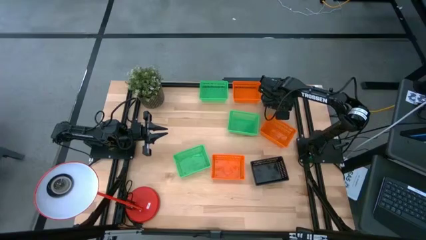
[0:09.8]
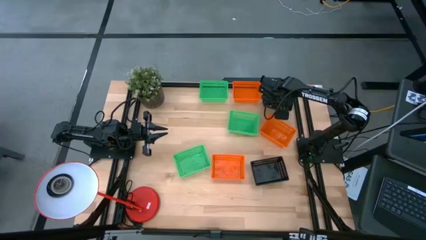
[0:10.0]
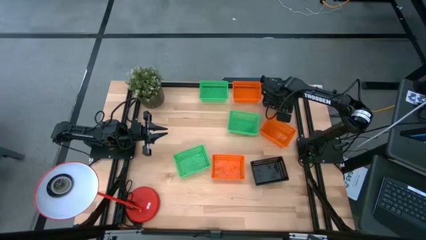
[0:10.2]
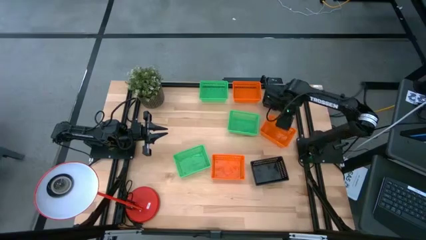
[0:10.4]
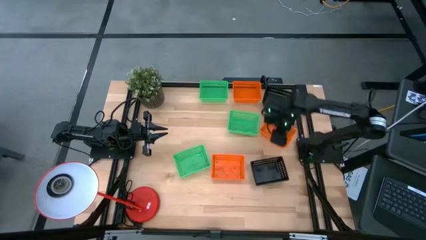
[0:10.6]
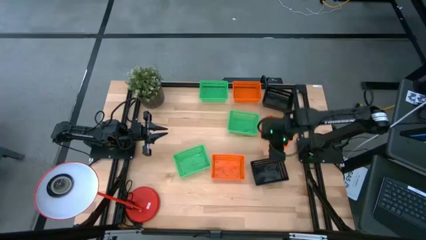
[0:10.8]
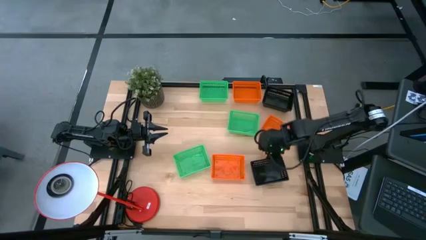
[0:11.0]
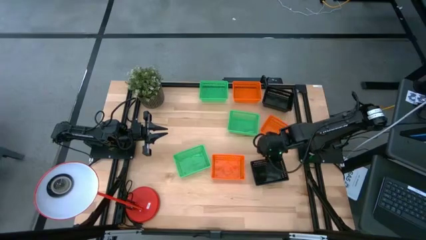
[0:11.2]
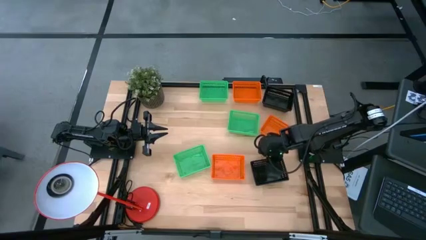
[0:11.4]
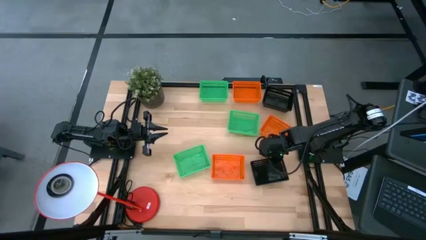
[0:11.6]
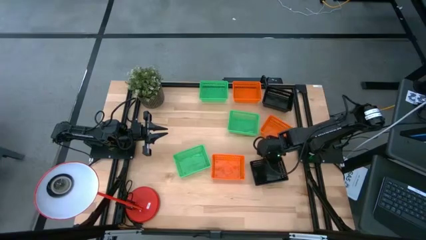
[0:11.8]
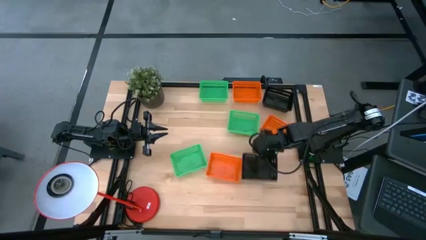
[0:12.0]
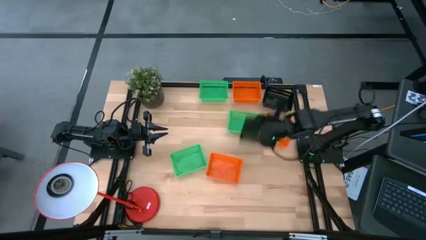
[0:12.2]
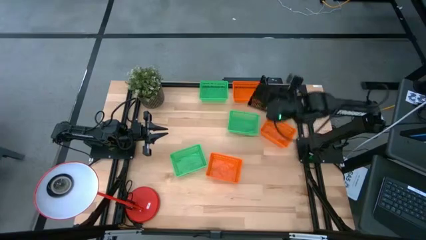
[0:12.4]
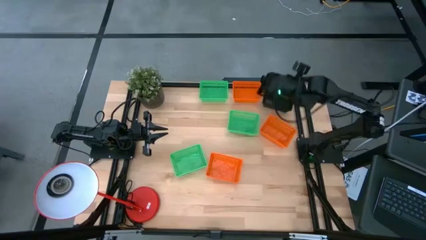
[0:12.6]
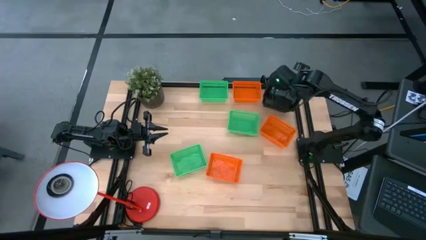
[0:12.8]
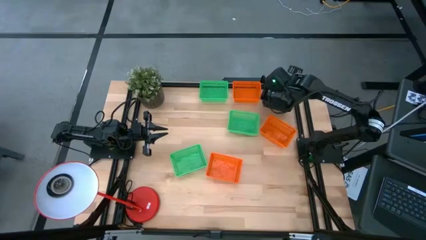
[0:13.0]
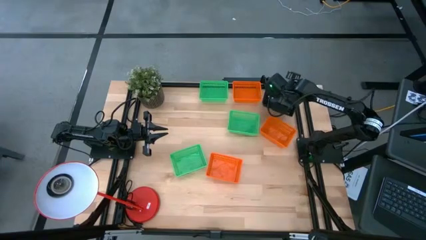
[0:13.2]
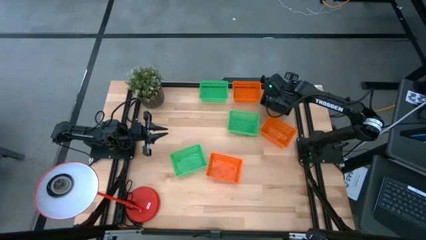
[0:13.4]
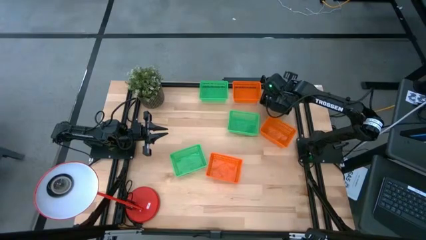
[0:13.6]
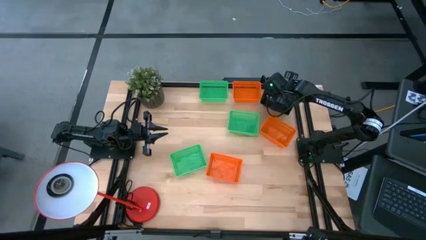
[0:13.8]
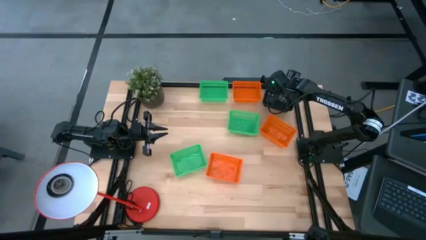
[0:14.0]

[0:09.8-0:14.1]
Stack the bottom black bin on top of the top black bins

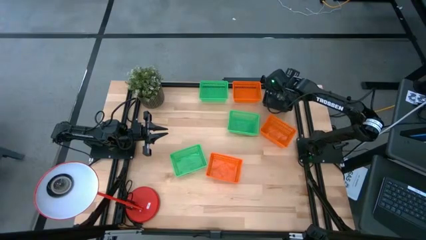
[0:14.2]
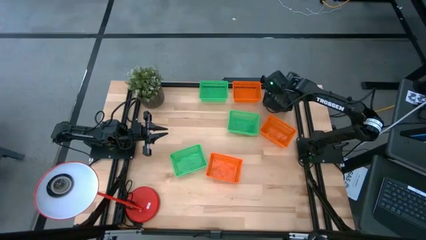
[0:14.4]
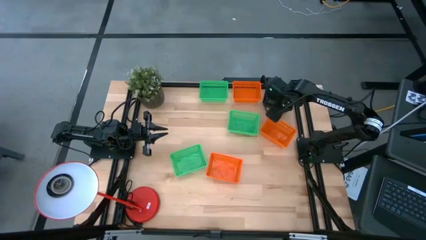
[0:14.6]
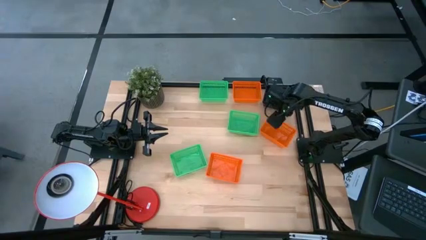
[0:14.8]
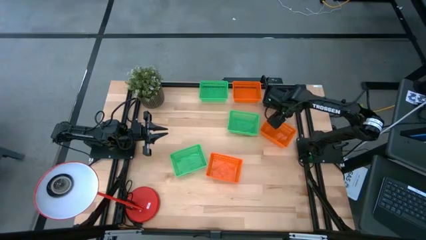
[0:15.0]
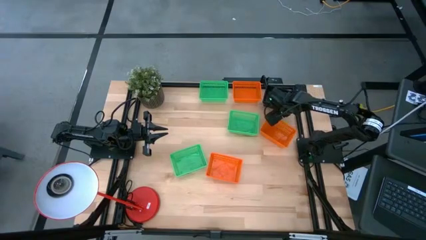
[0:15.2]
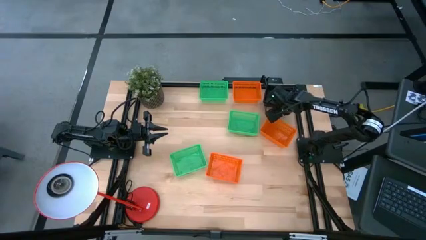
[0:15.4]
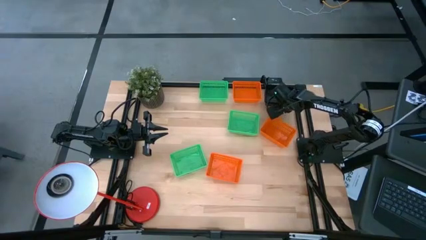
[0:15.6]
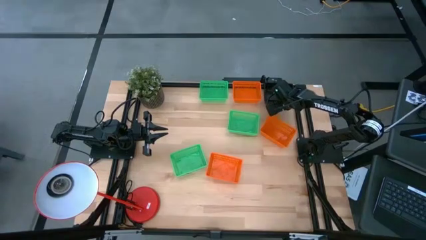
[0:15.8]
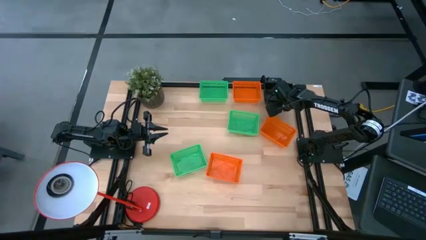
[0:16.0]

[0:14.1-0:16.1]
Adjust the stacked black bins on the table

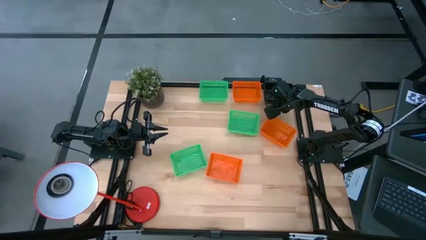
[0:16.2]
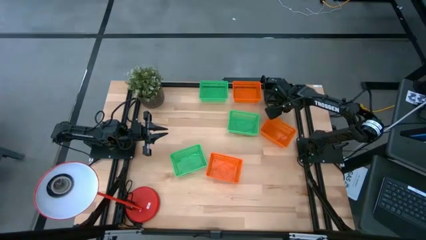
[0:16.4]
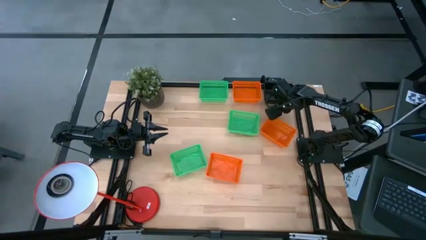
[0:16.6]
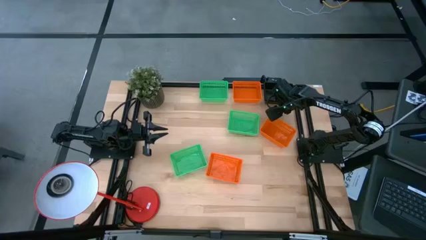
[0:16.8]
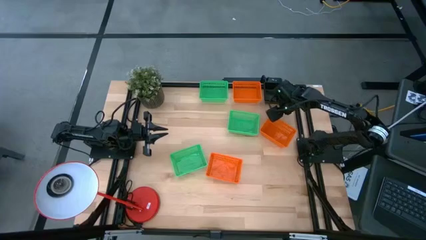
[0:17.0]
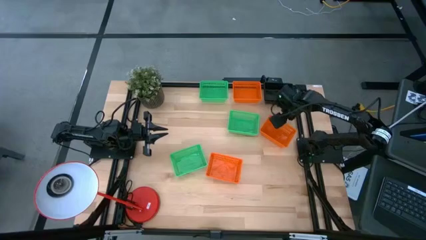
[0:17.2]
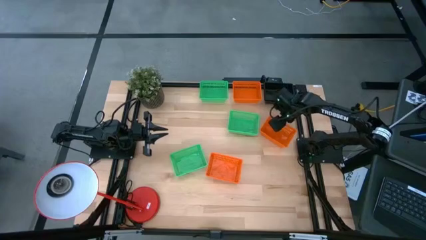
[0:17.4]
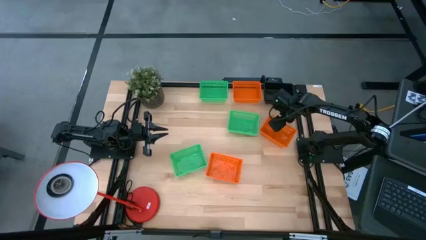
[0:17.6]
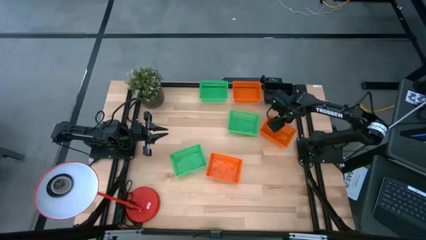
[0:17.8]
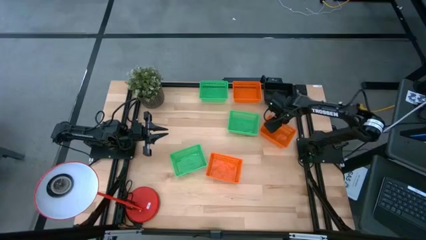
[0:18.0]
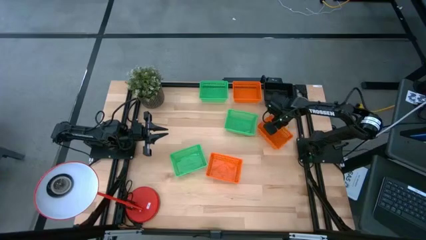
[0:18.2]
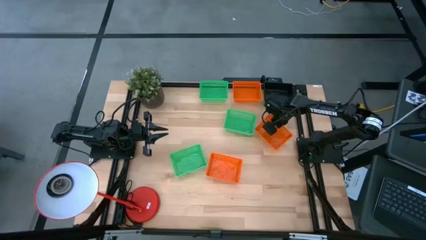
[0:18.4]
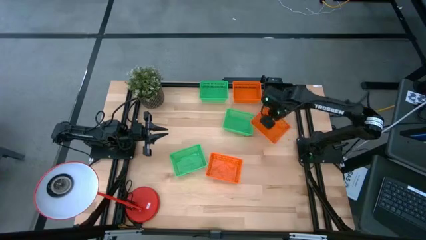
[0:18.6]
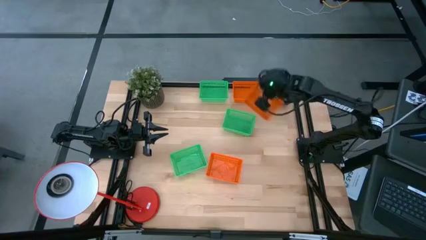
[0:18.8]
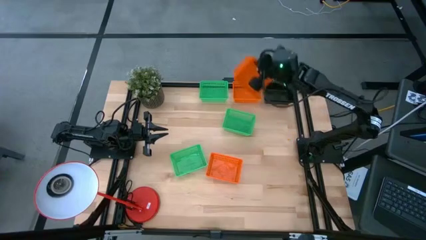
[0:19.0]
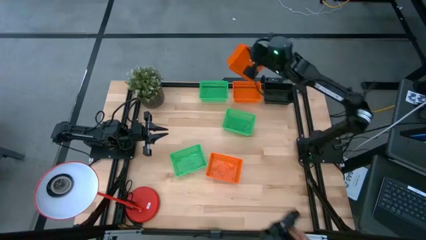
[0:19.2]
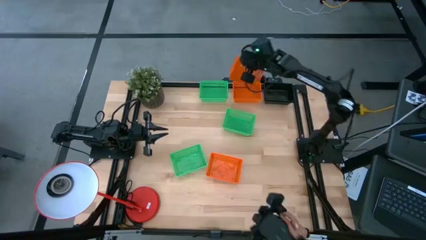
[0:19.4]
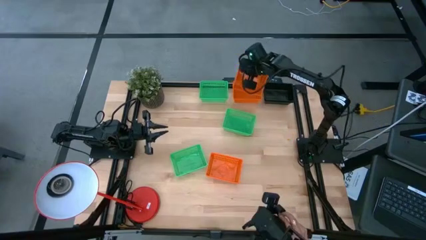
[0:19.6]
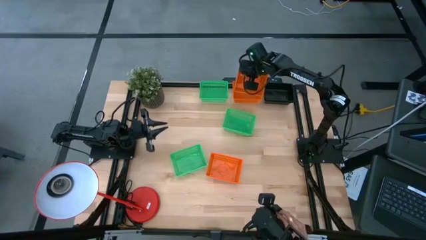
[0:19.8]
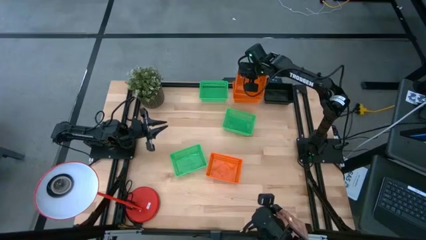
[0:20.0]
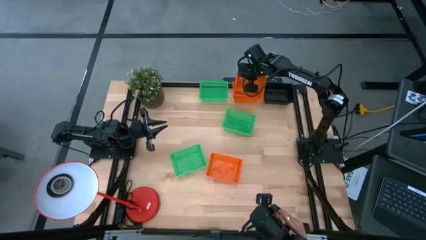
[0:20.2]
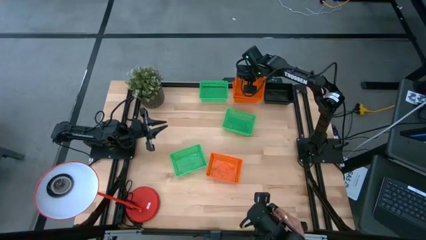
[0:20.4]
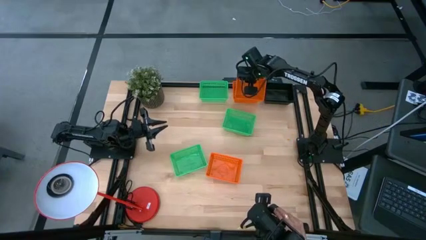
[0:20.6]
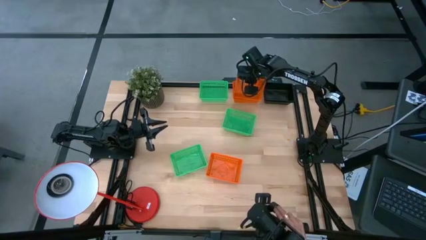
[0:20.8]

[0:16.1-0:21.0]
Stack the middle orange bin on top of the top orange bin

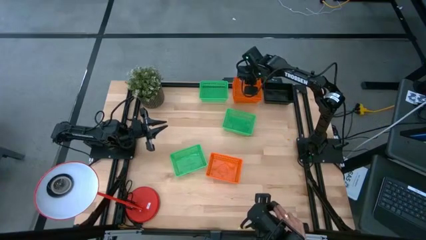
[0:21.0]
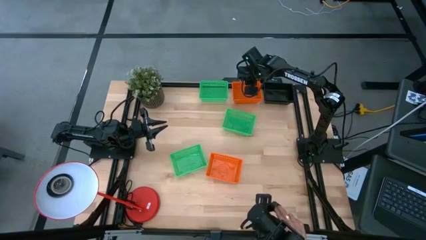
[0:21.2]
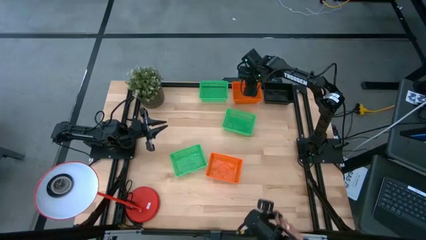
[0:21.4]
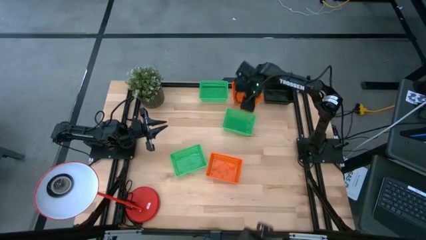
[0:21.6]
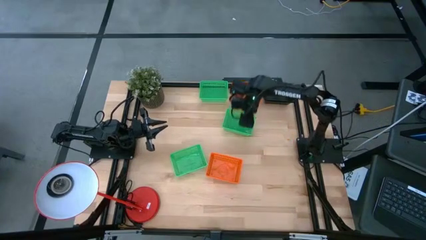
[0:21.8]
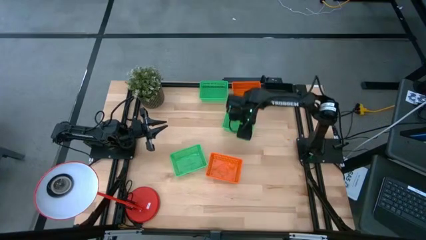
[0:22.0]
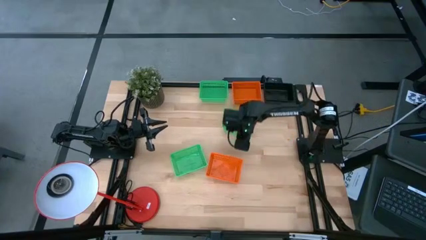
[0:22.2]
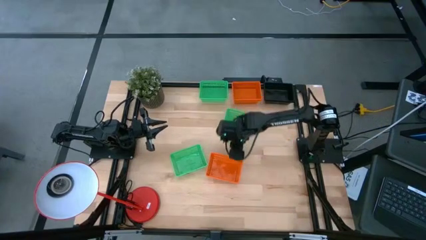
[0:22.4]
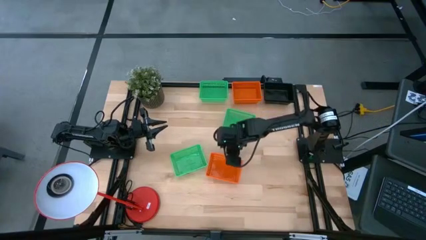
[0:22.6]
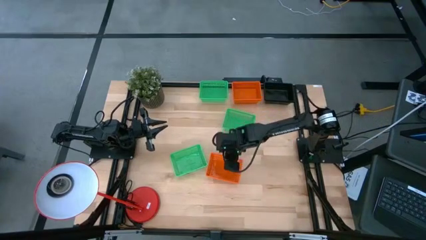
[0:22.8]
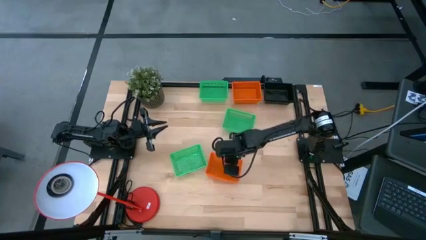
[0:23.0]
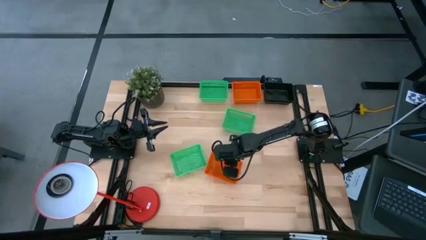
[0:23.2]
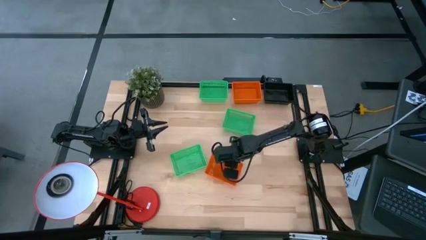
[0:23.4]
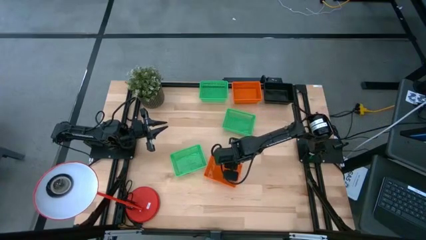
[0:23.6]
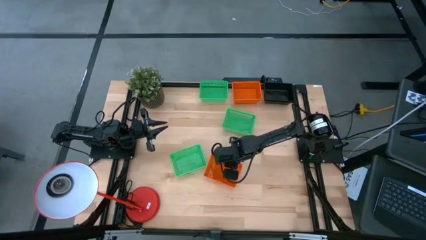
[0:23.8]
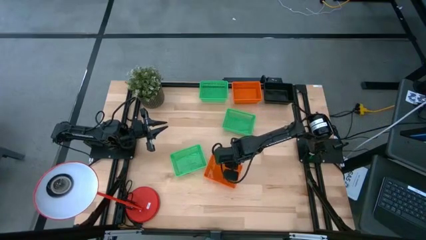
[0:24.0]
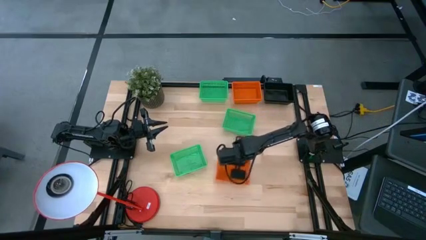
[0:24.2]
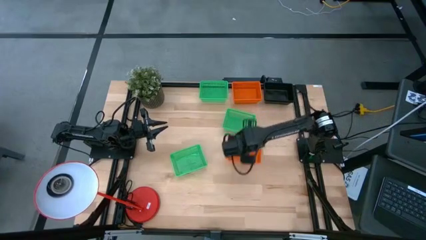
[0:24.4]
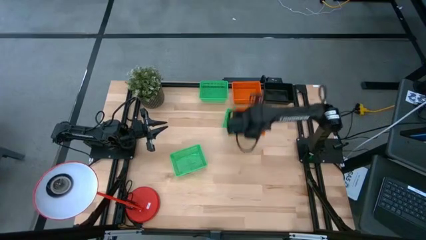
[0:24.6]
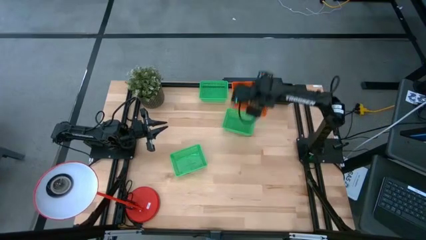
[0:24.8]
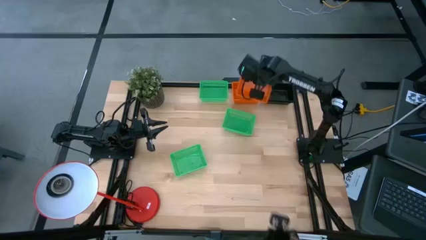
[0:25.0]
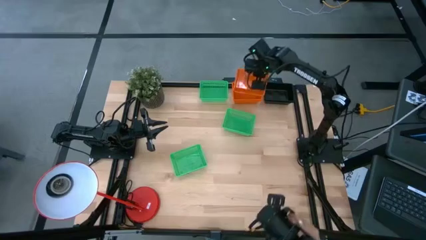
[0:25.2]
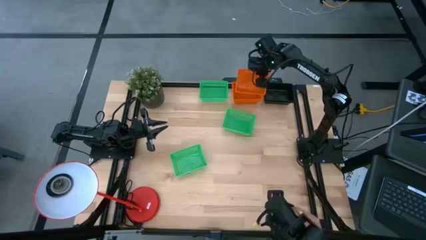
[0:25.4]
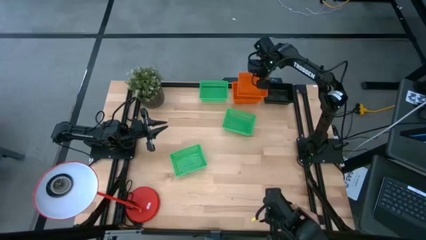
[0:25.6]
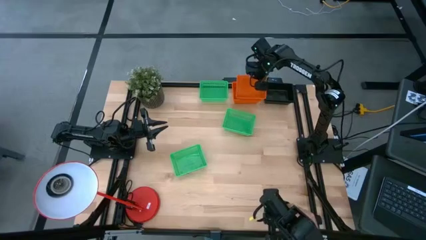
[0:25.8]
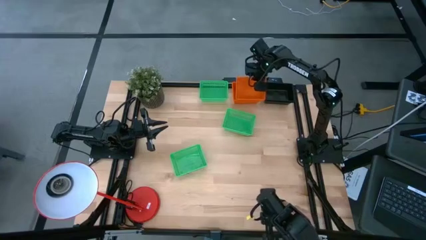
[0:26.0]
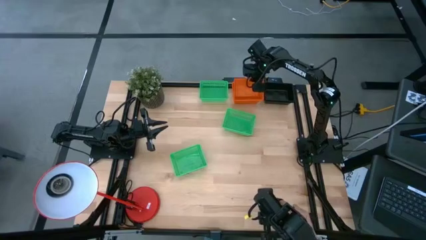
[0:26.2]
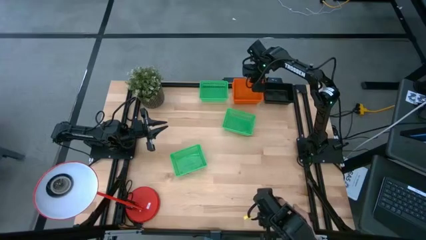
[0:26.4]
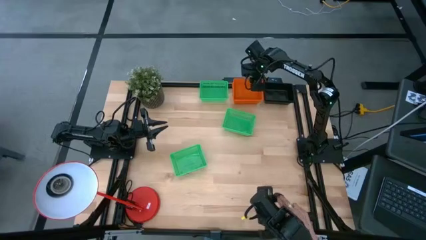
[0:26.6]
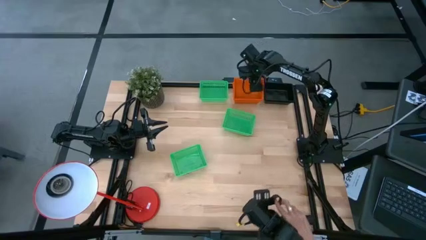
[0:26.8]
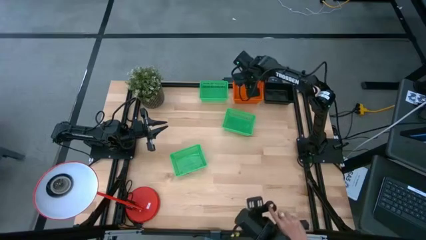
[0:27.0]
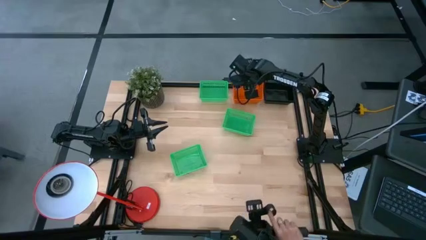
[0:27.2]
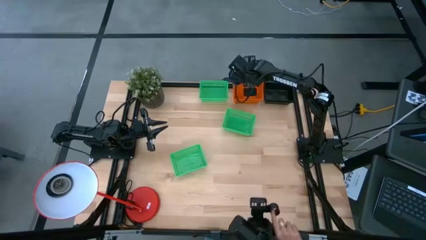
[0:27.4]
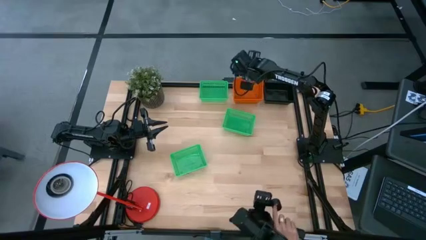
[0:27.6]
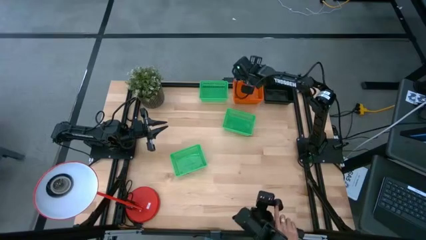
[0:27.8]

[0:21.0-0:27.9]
Stack the bottom orange bin on top of the top orange bins
